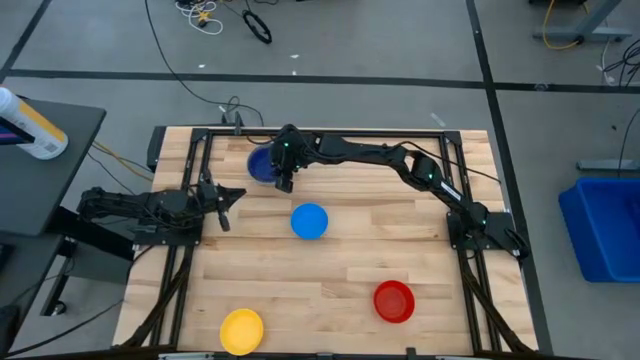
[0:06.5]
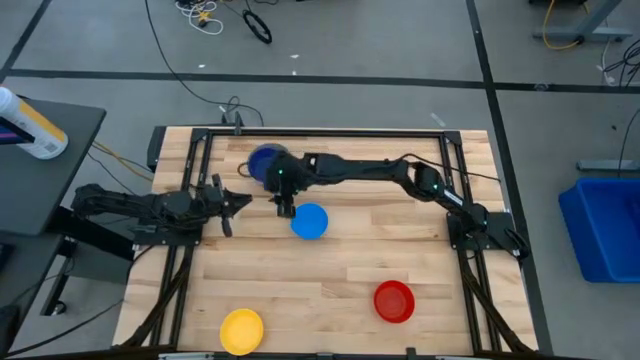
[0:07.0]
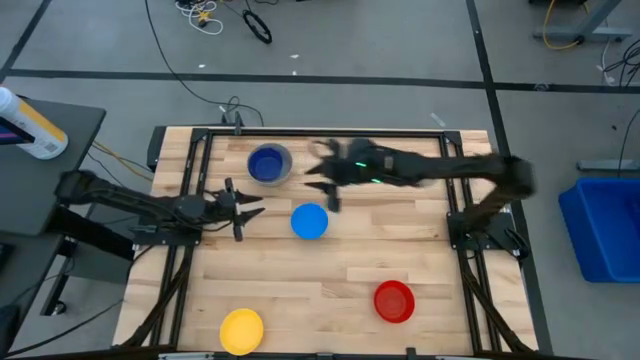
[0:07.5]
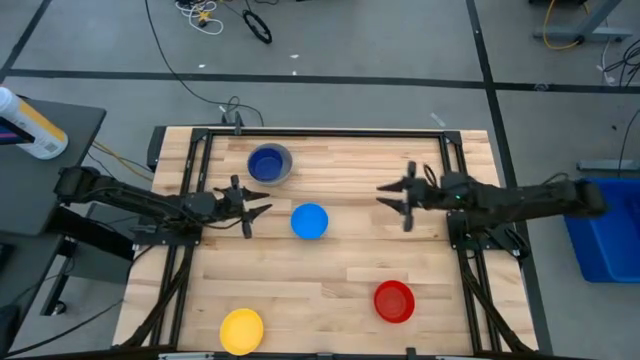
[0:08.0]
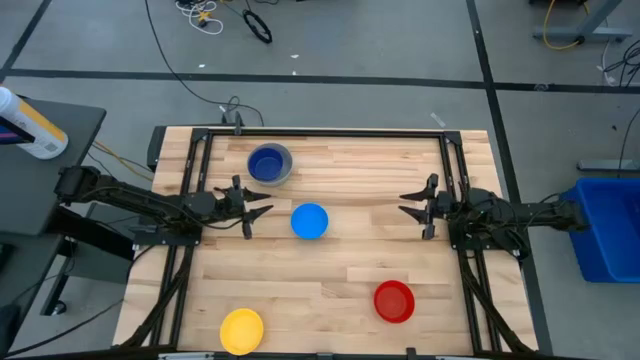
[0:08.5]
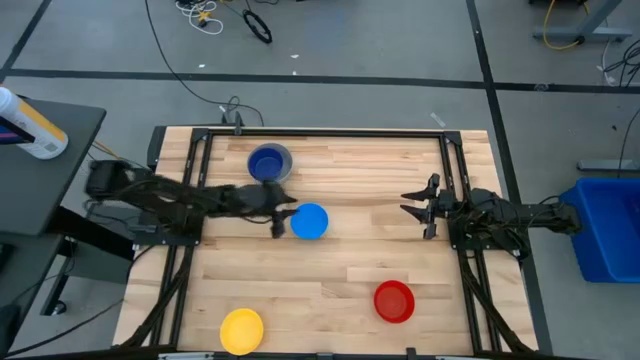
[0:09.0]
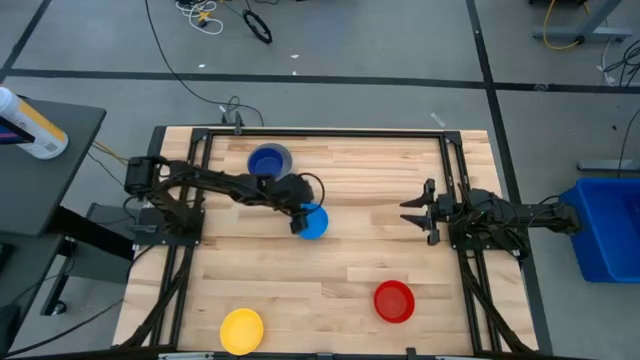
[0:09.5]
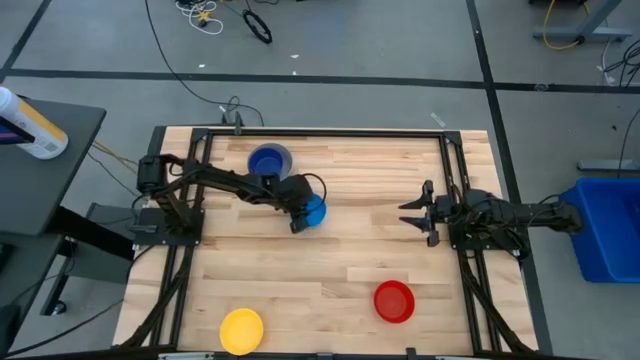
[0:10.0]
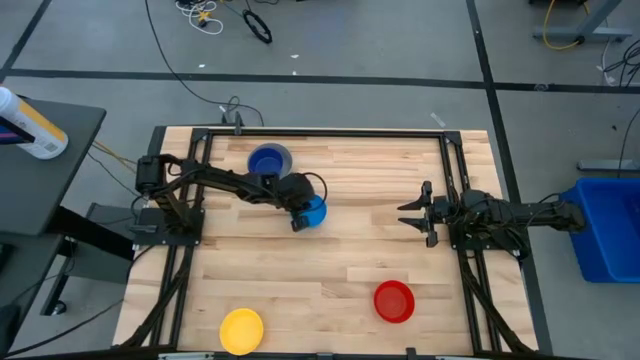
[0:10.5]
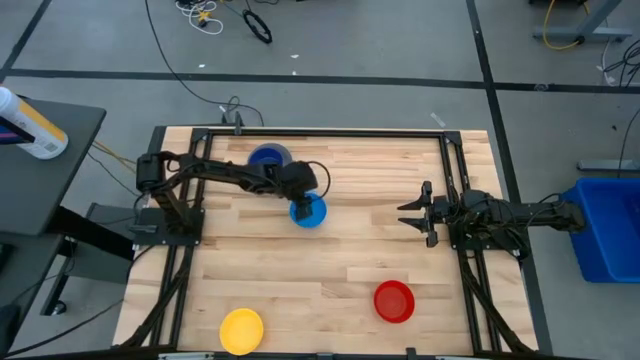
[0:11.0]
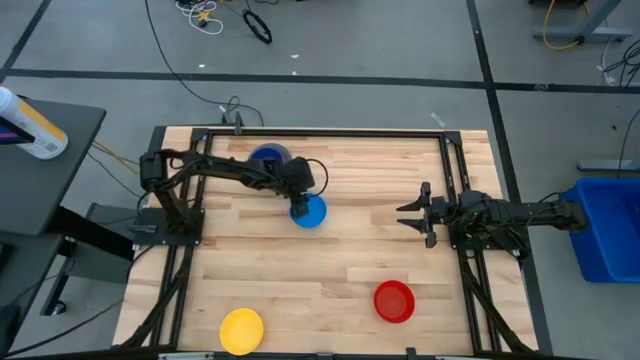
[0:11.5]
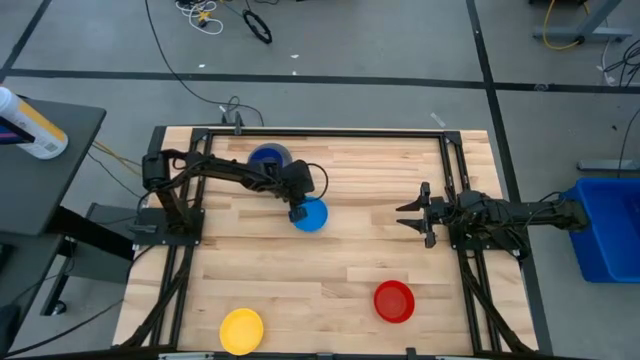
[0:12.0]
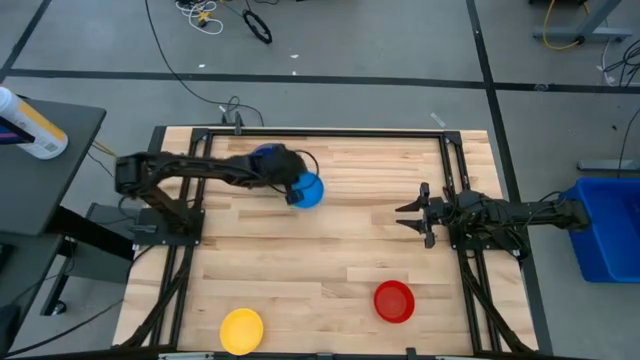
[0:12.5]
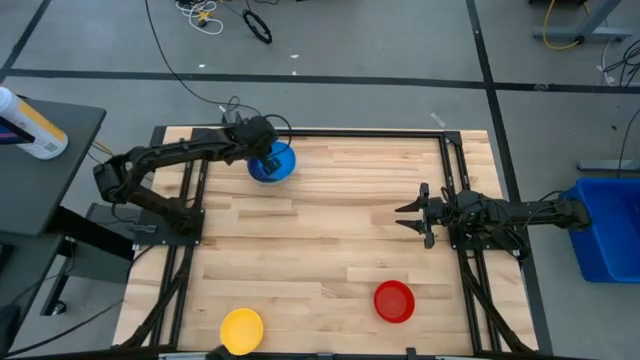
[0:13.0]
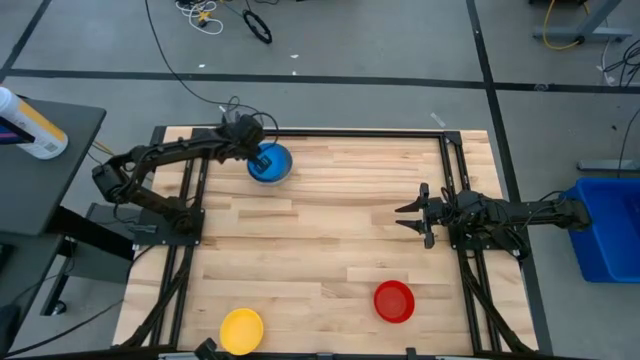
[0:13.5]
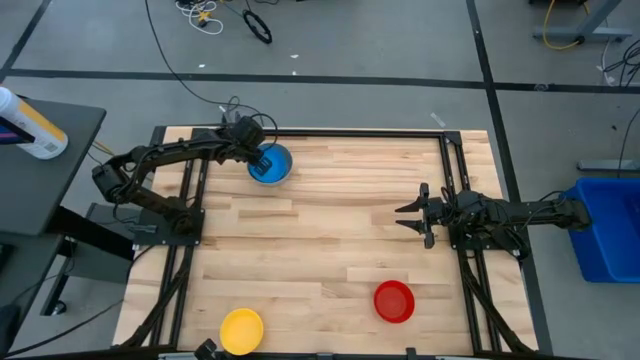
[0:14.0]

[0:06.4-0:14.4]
Stack the light blue bowl on the dark blue bowl

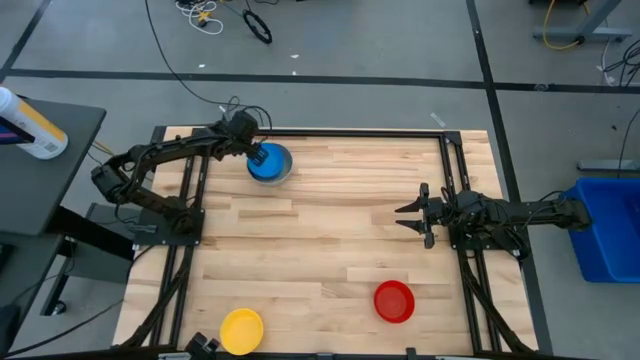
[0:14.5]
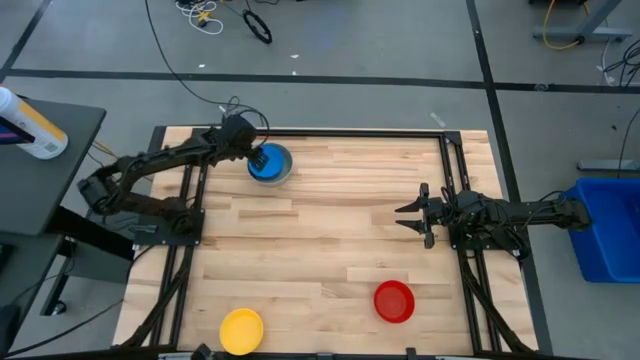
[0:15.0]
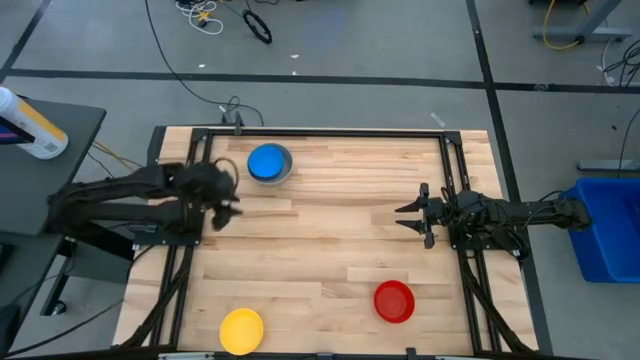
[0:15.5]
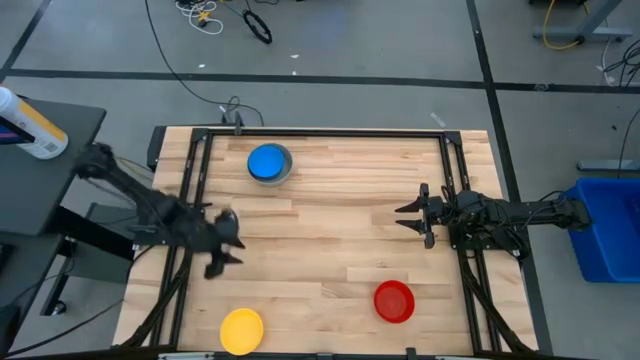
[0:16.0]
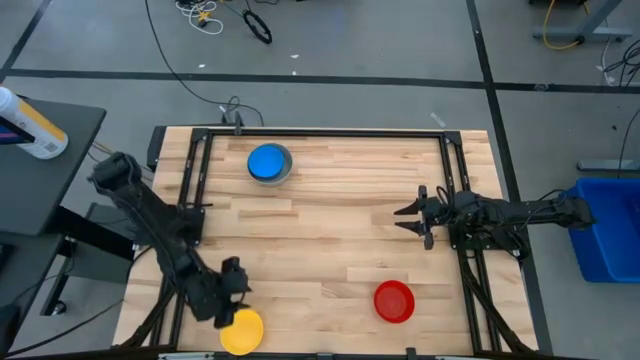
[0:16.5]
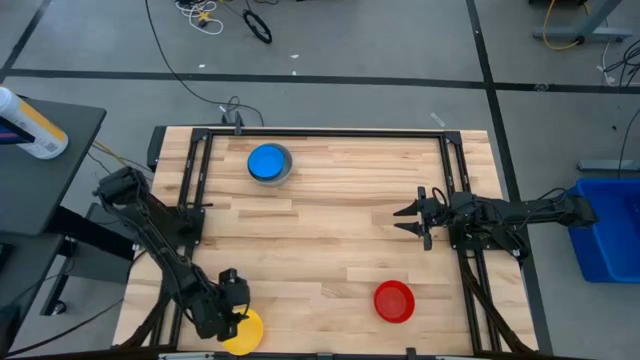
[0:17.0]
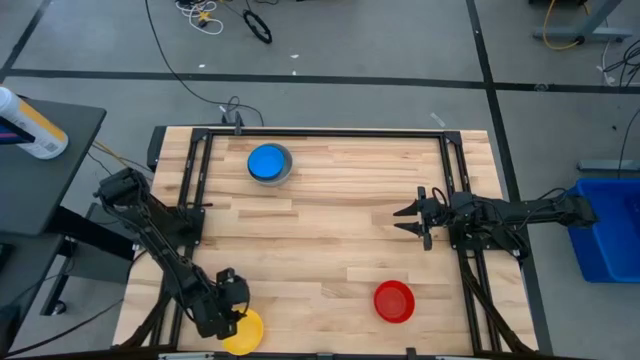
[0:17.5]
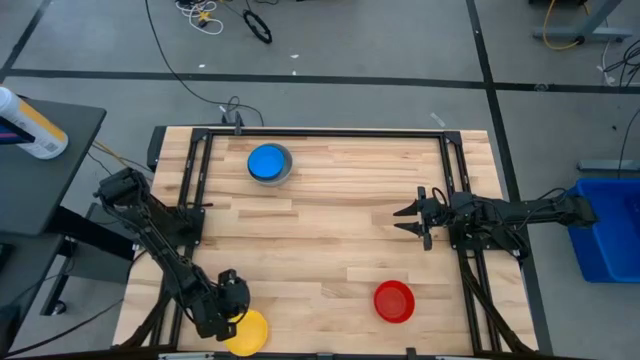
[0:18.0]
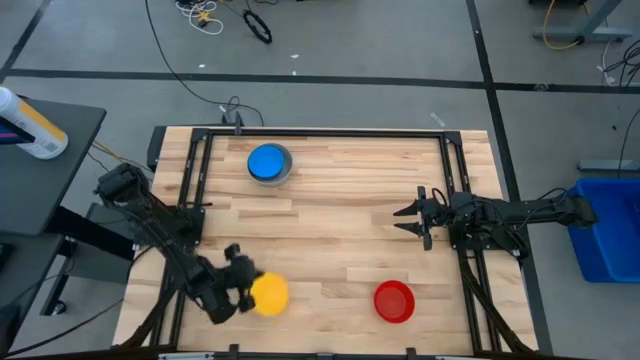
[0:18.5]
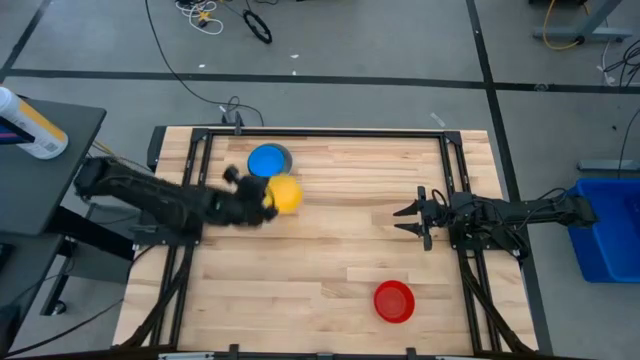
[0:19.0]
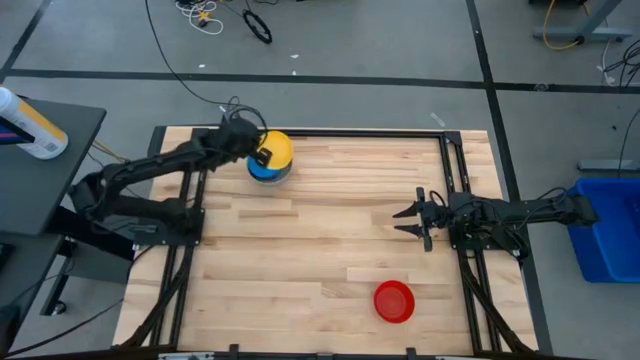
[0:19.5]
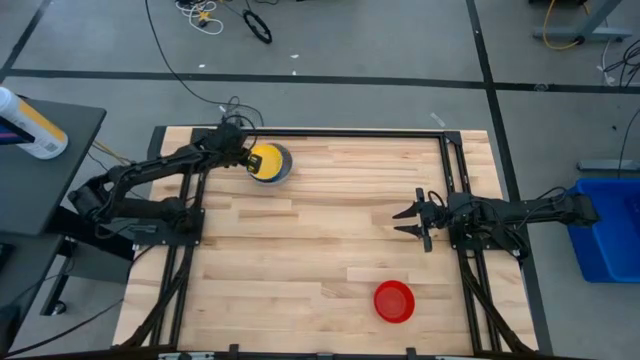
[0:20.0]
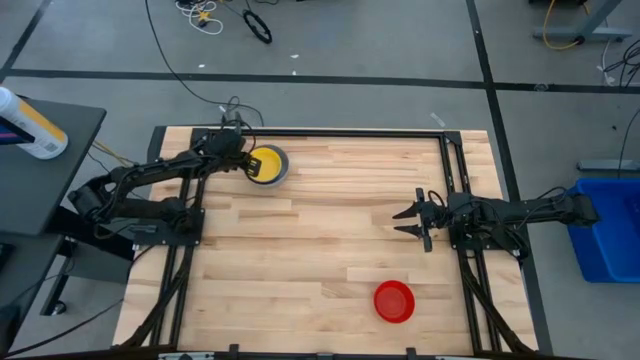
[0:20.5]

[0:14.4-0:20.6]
Stack the yellow bowl on the light blue bowl
